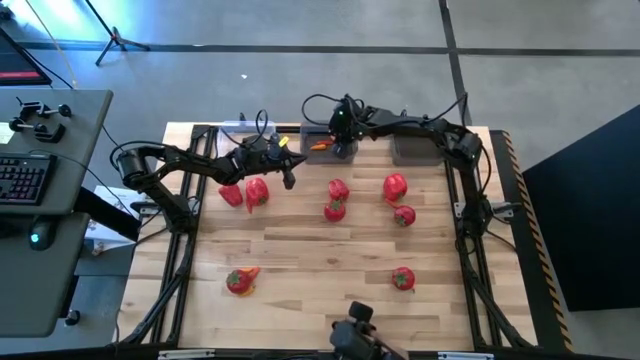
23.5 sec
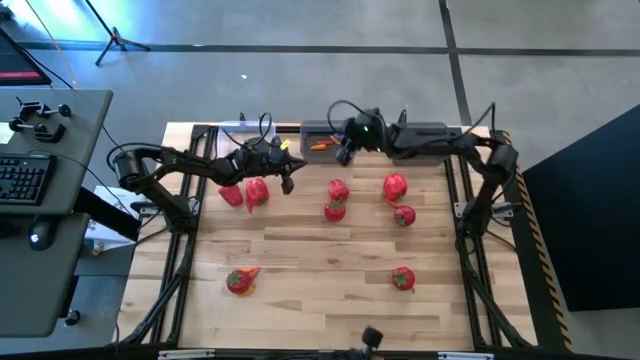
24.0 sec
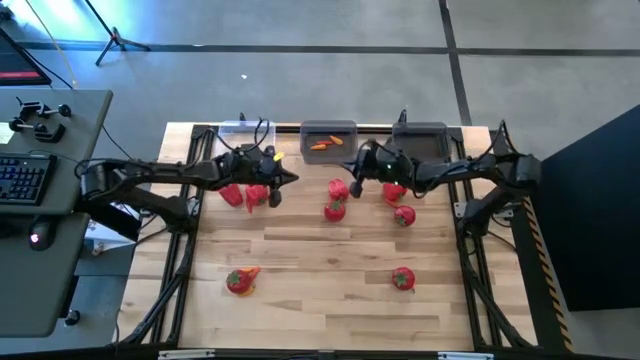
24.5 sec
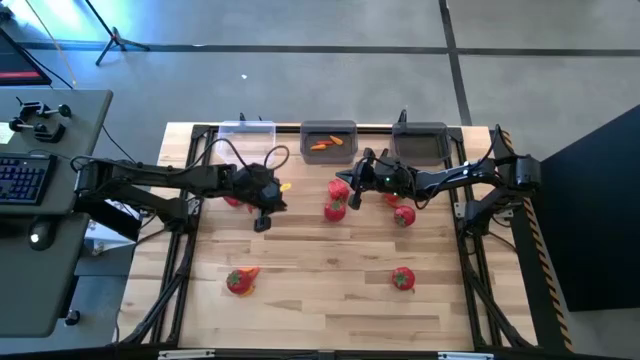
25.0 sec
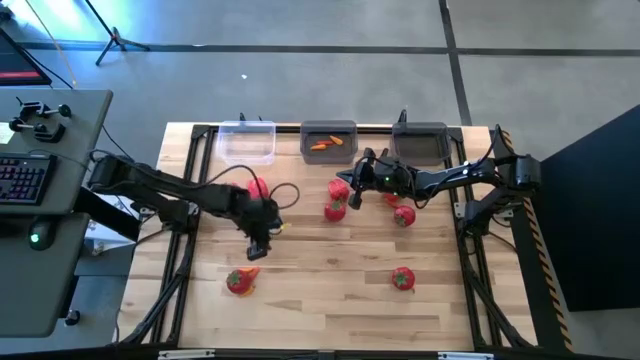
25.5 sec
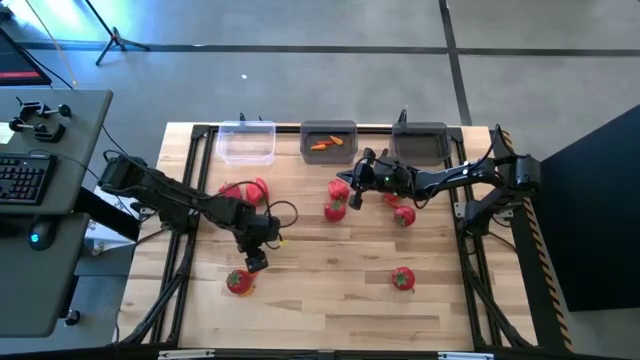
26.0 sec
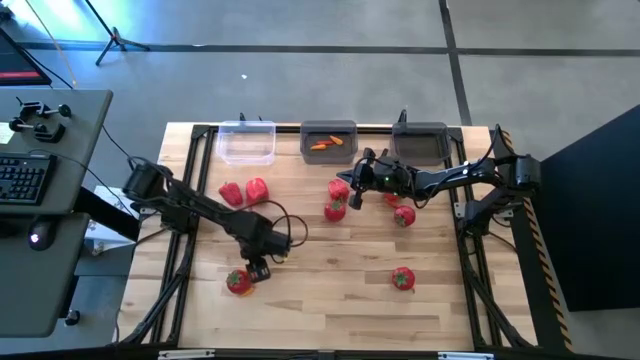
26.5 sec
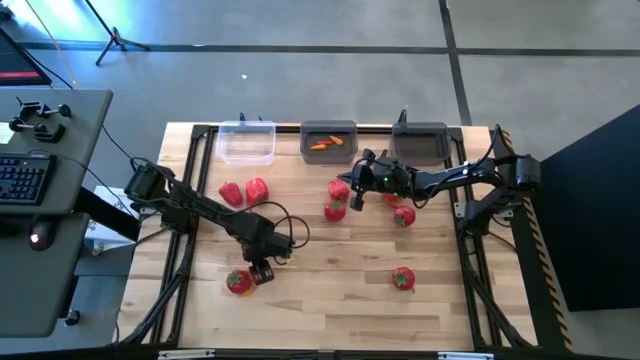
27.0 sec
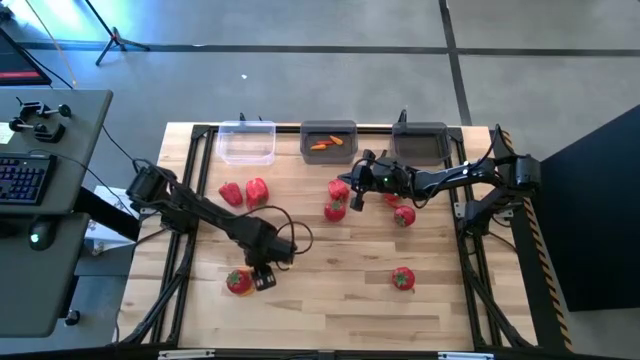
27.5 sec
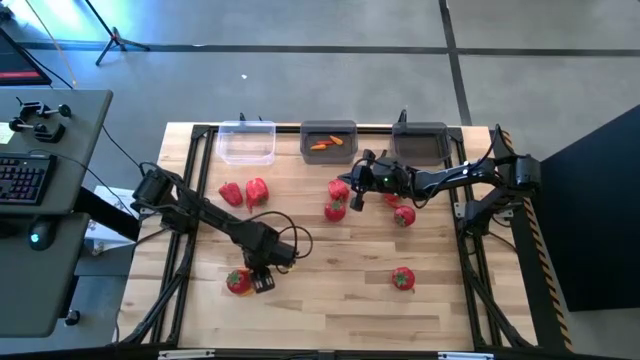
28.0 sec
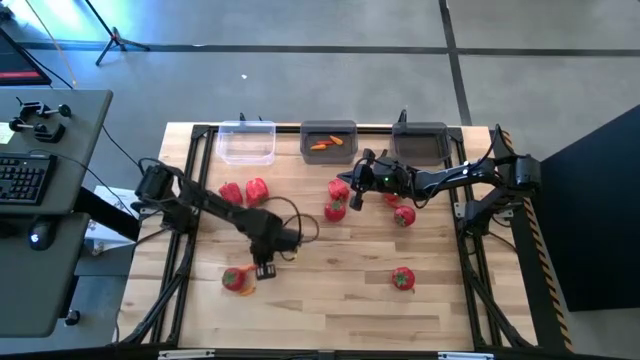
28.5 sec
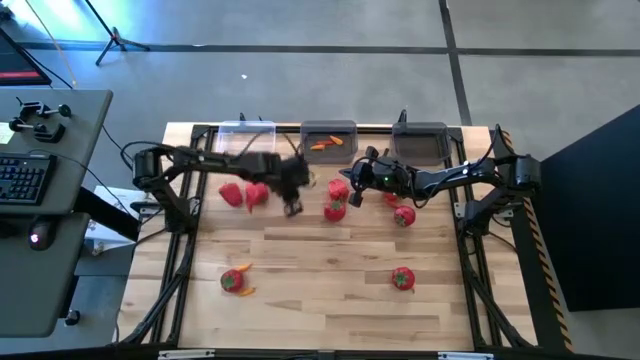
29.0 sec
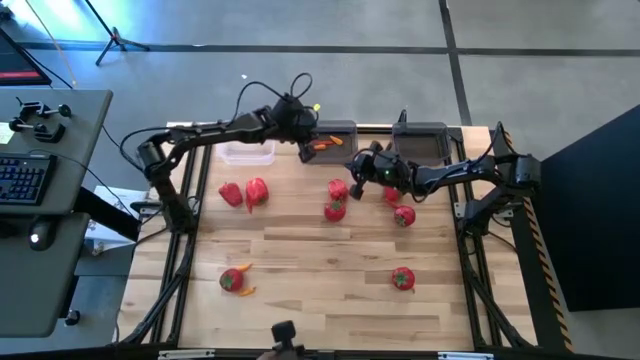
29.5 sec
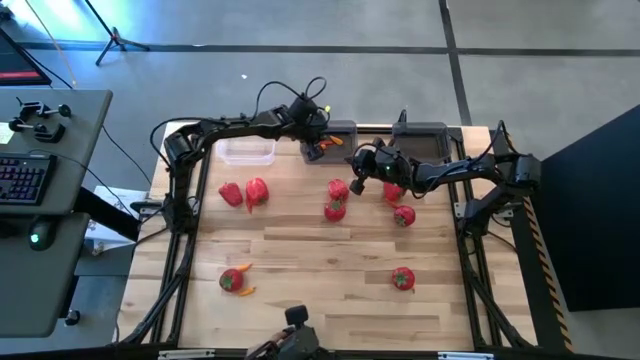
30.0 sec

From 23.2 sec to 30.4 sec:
Task: Sort produce into baskets
Put the orange chili pepper into the left black bin

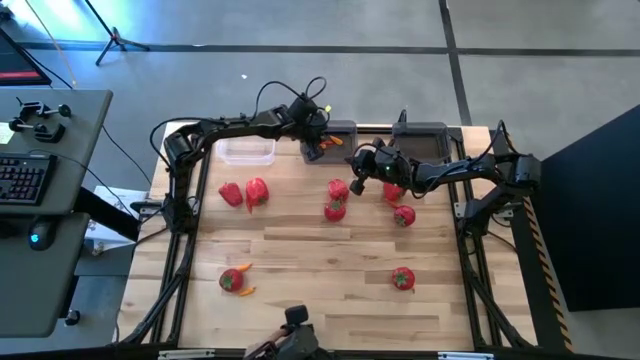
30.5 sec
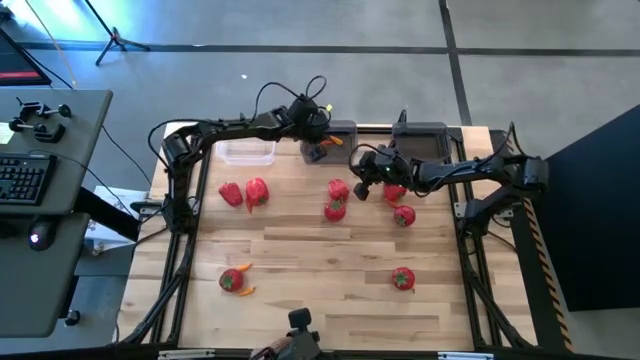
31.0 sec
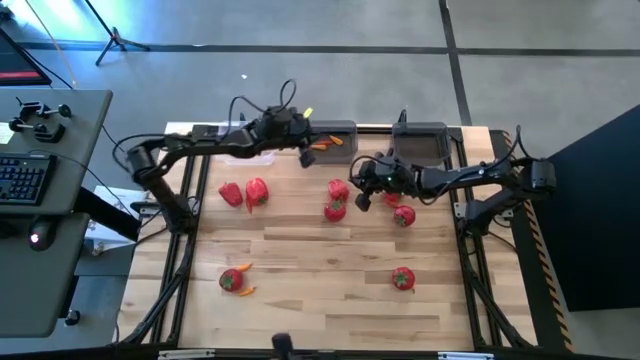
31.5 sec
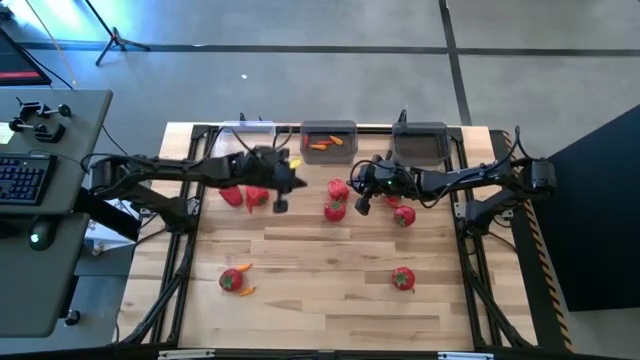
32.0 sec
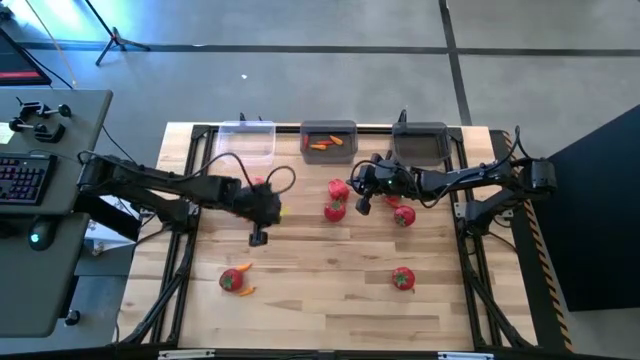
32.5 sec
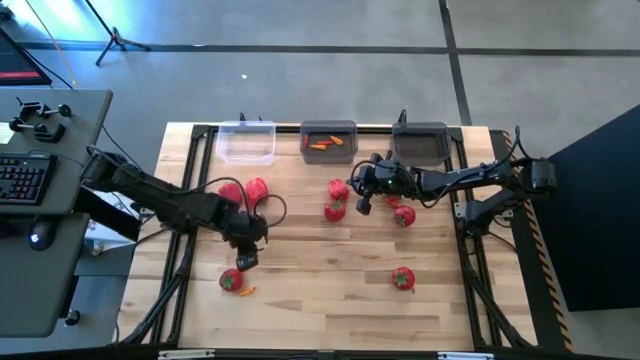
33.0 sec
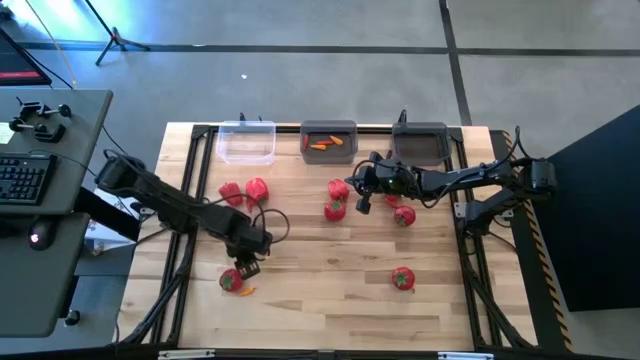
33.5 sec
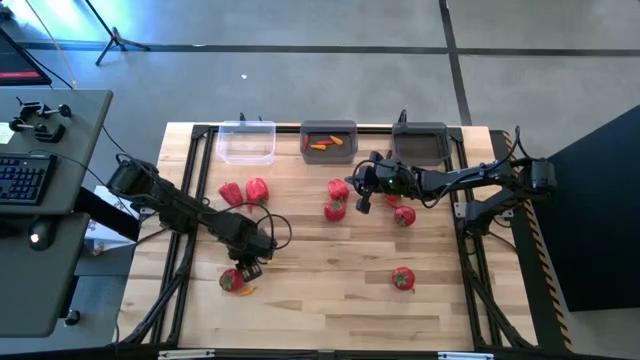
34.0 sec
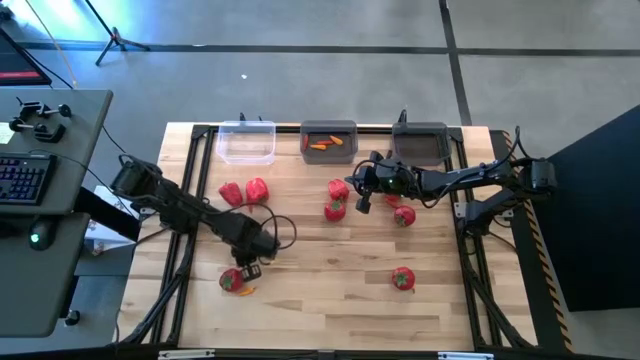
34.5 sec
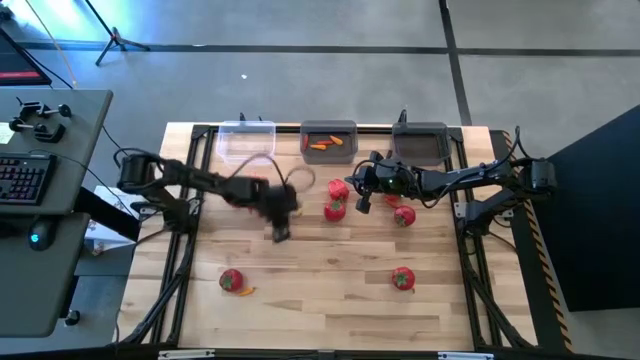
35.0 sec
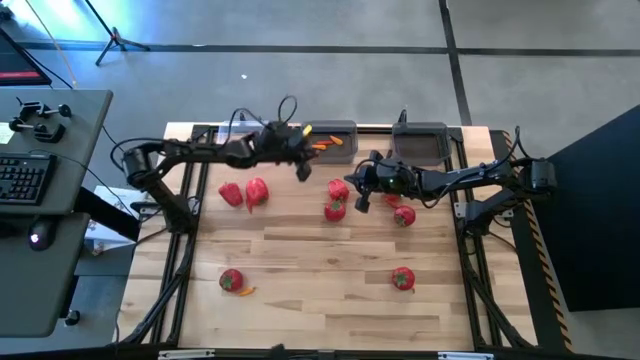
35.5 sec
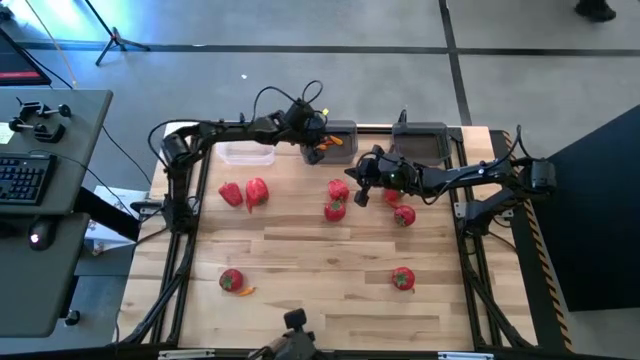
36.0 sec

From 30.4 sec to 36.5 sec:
Put the yellow chili pepper into the left black bin

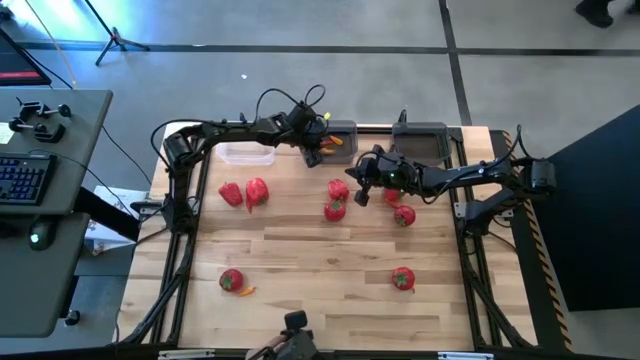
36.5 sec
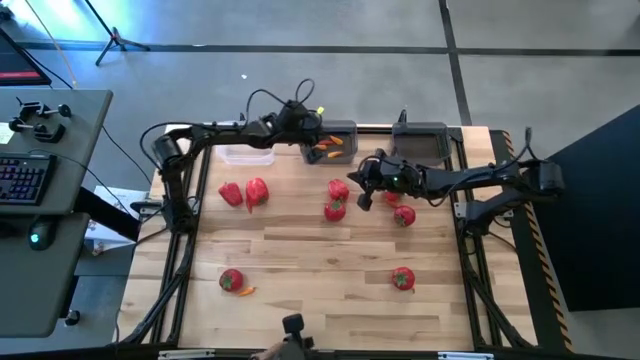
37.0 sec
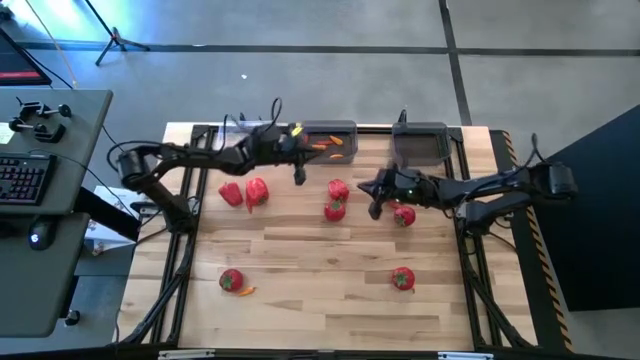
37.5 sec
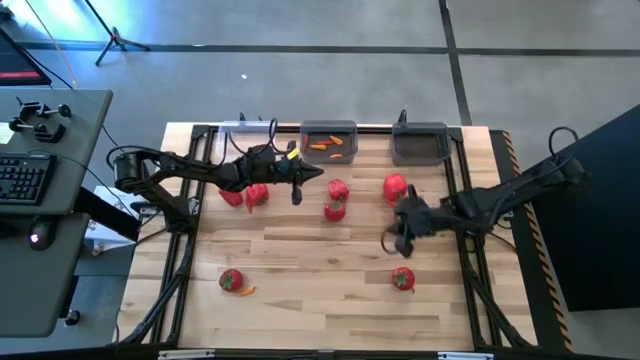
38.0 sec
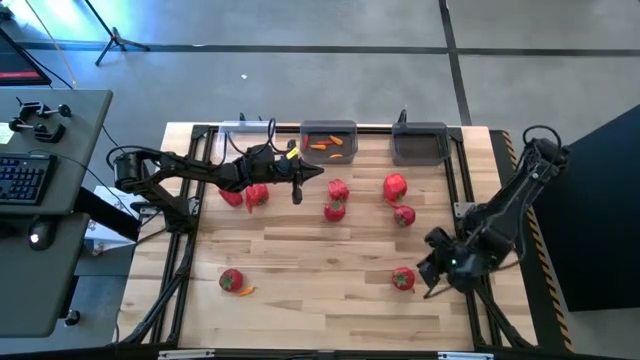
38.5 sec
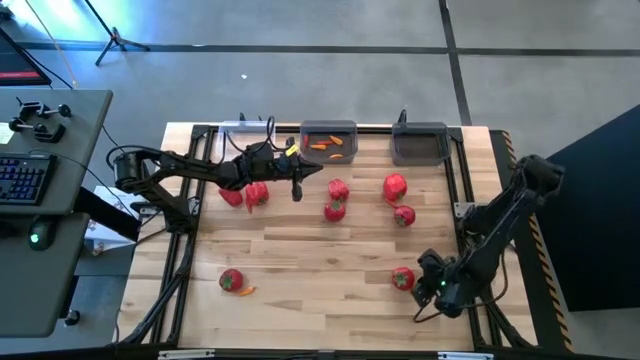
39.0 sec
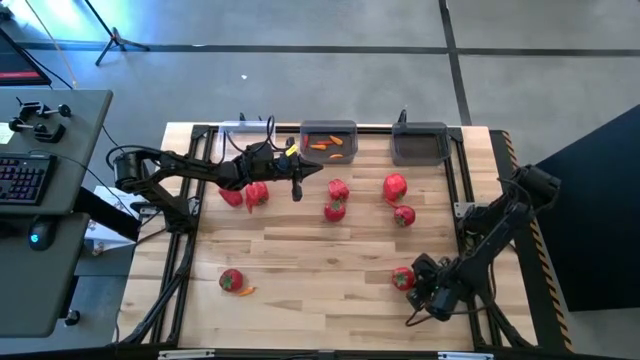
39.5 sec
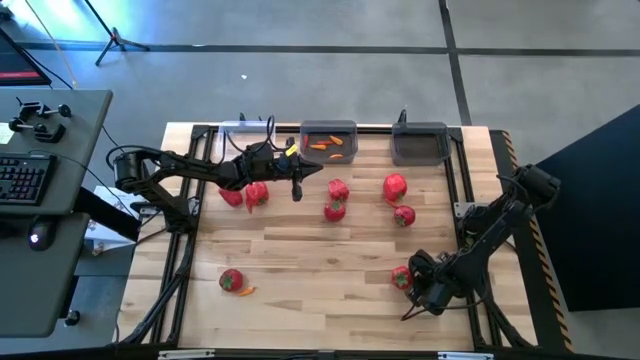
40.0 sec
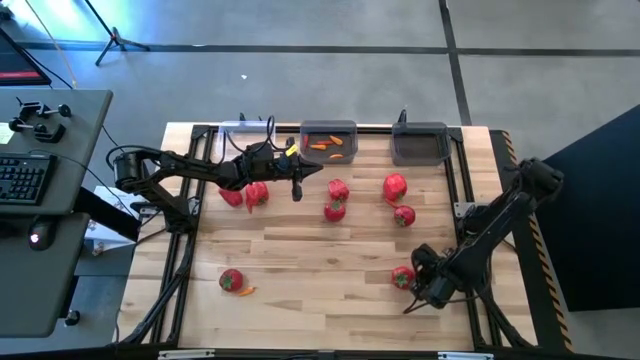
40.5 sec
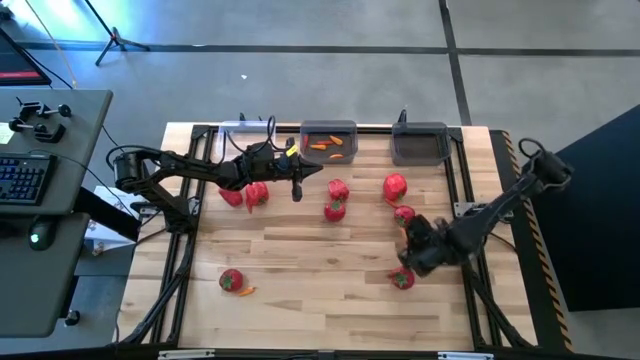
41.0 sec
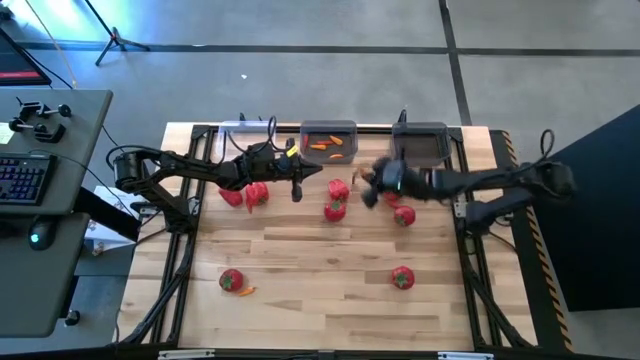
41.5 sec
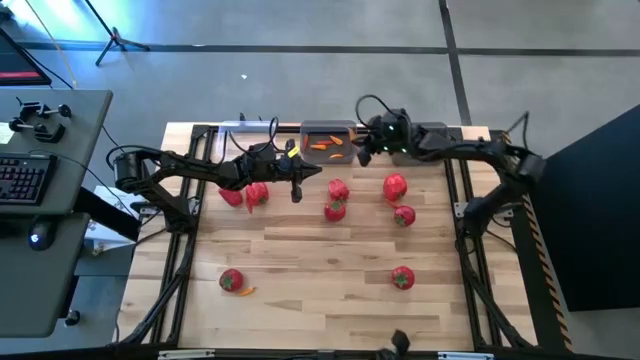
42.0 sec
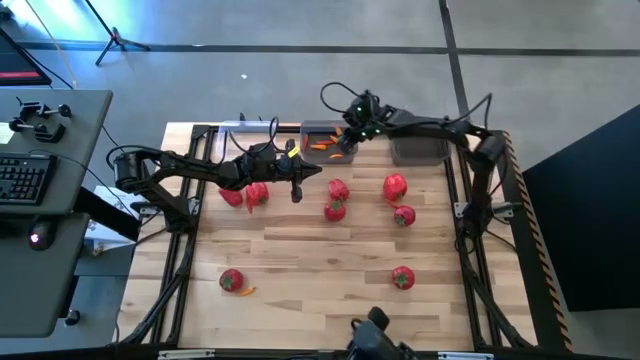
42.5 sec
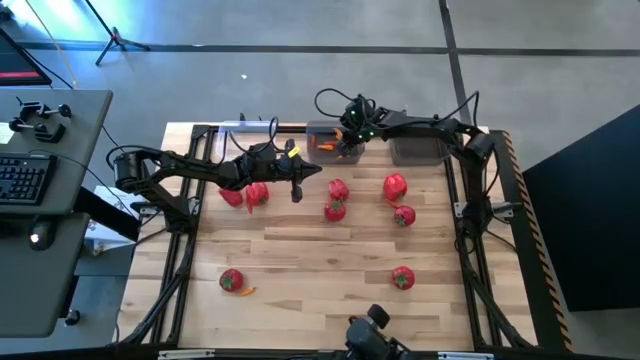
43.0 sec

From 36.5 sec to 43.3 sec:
Put the yellow chili pepper into the left black bin

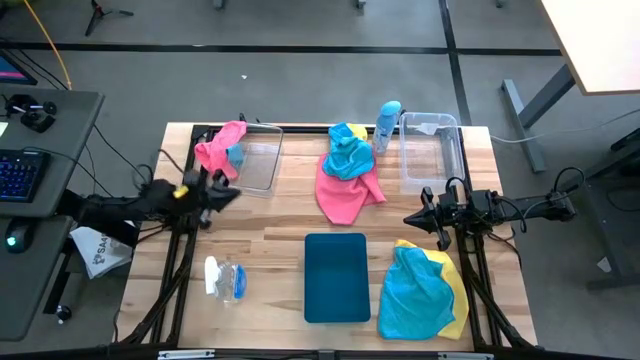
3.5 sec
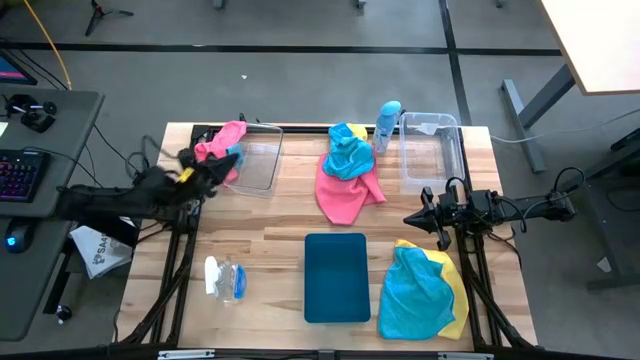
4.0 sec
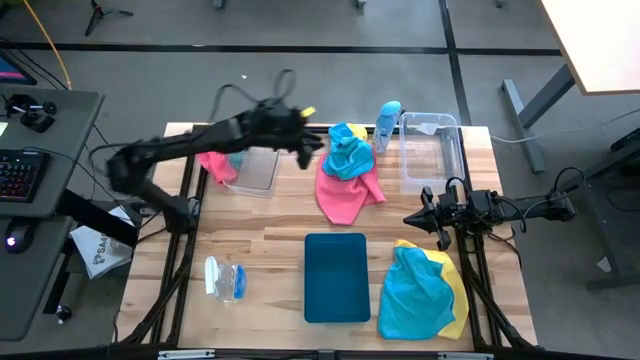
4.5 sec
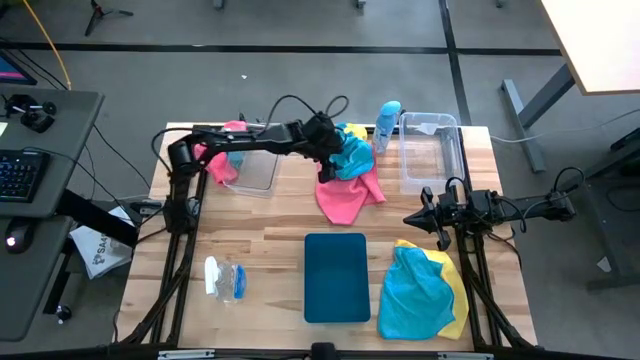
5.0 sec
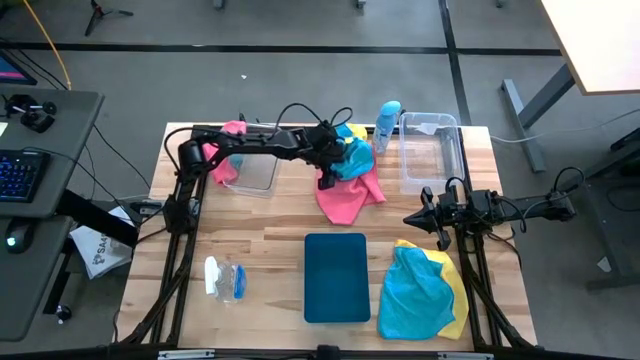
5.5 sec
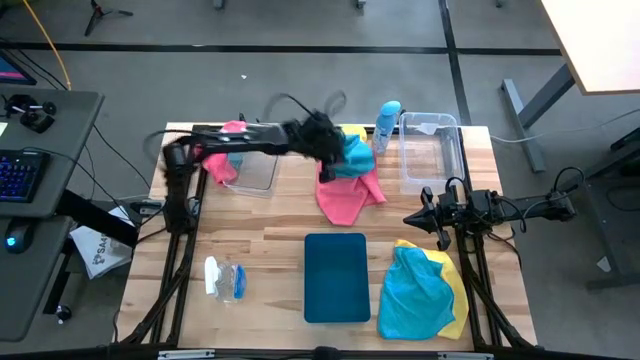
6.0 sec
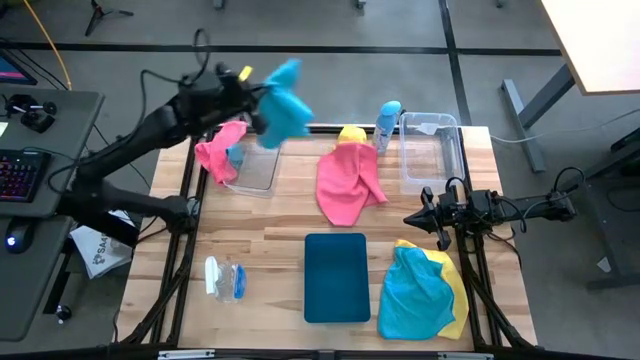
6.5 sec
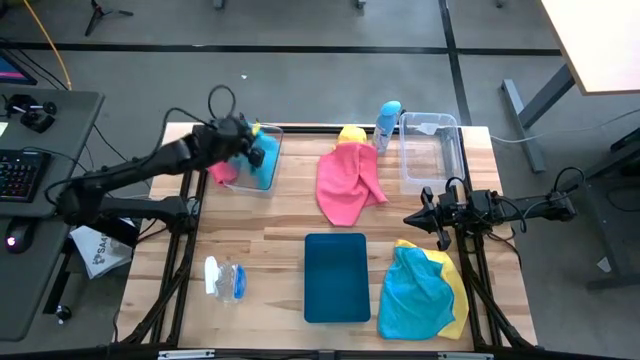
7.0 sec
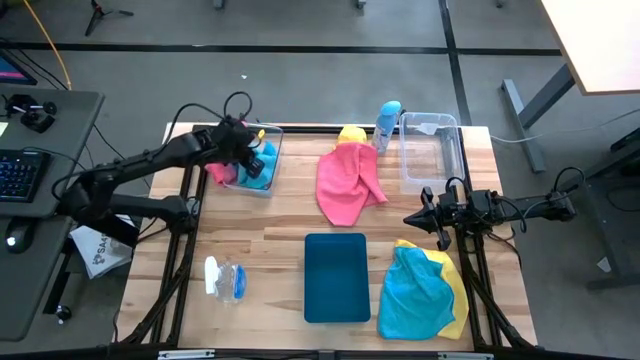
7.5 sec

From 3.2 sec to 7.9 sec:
Task: Sort microfiber towel by color & place in baskets
Put the top right blue towel into the left transparent bin
